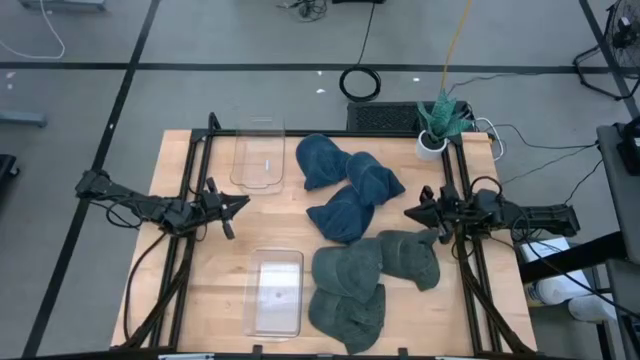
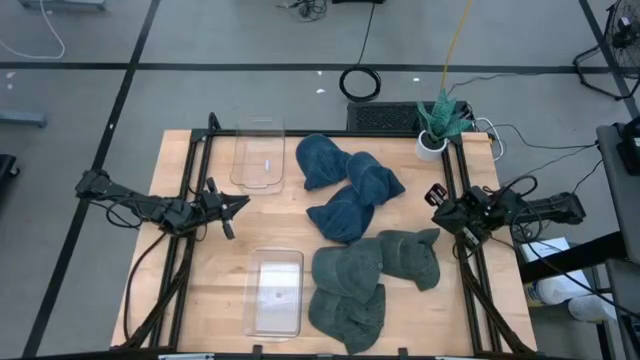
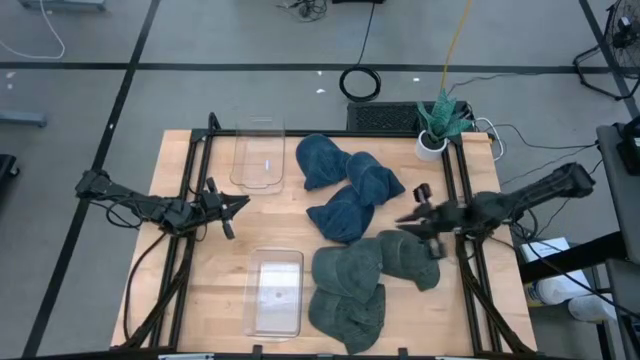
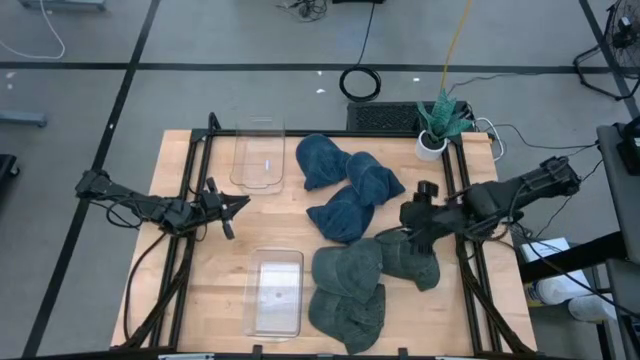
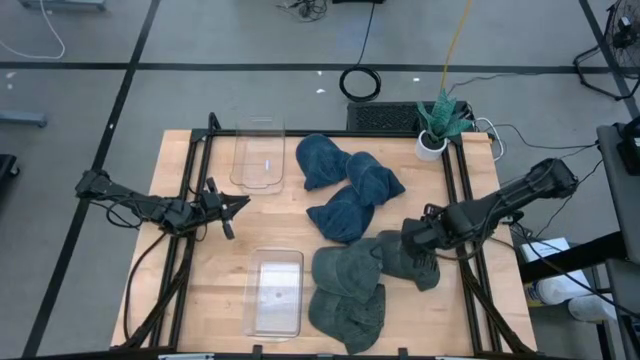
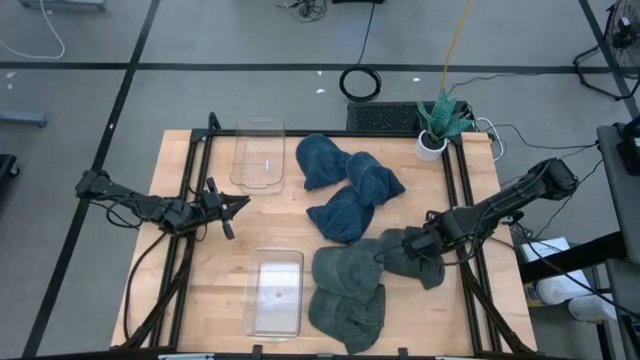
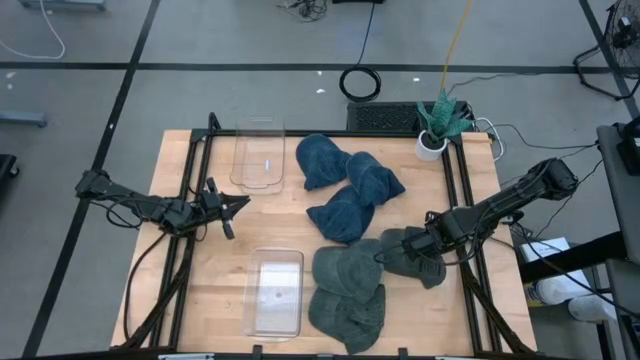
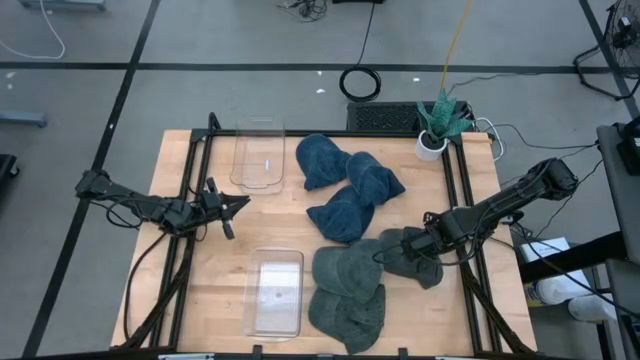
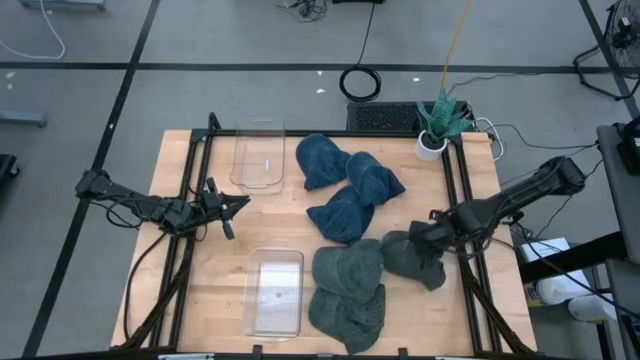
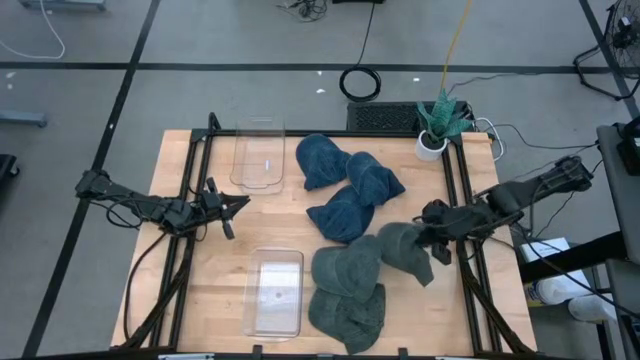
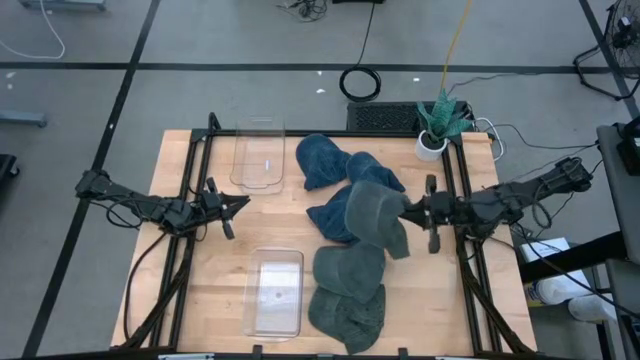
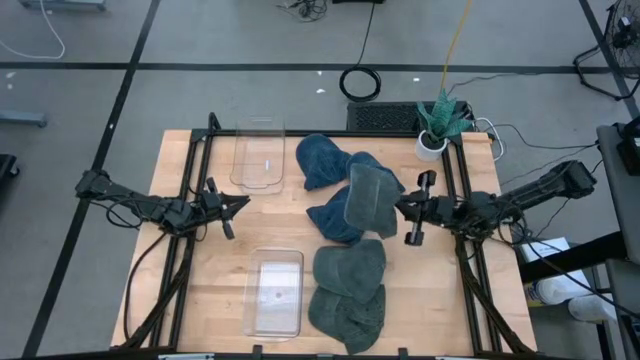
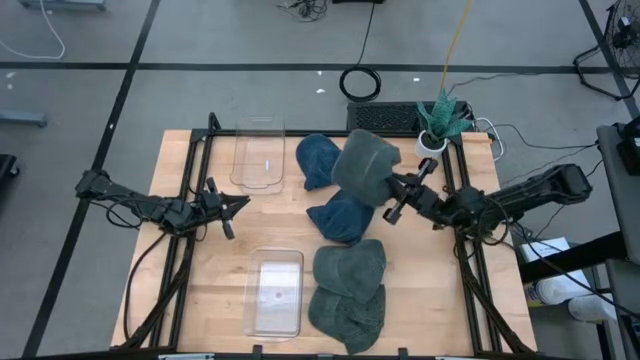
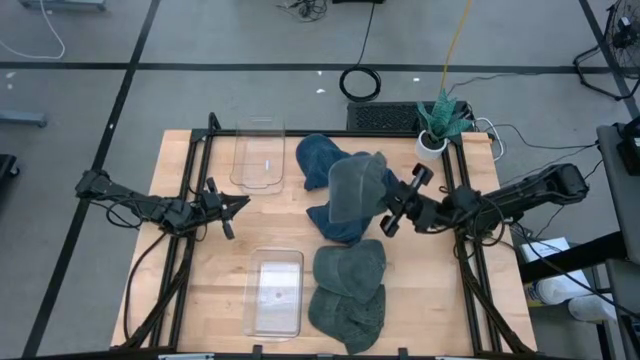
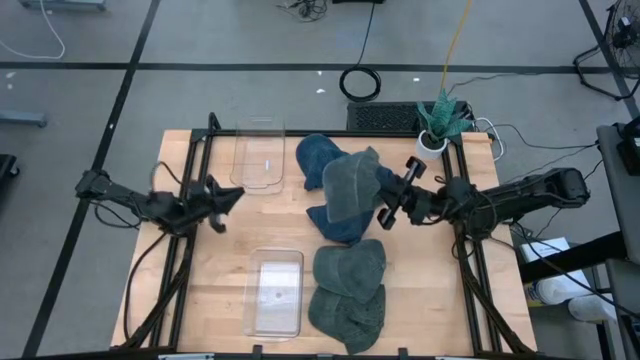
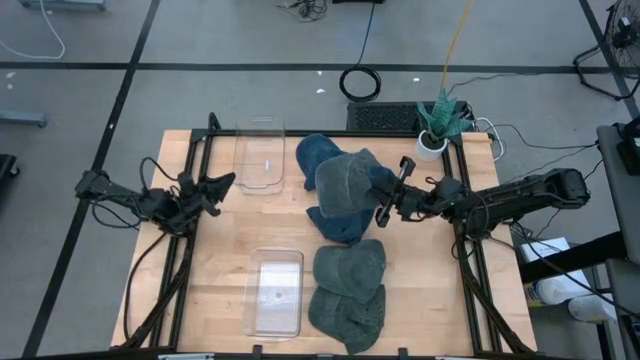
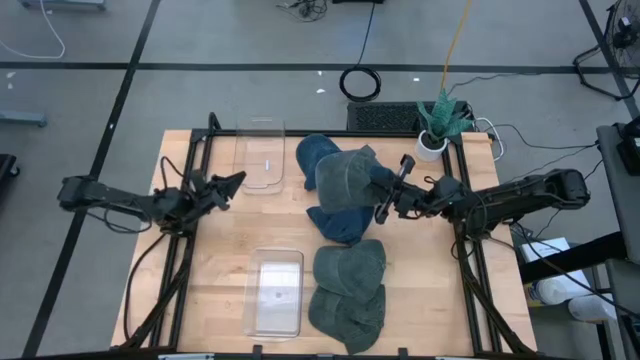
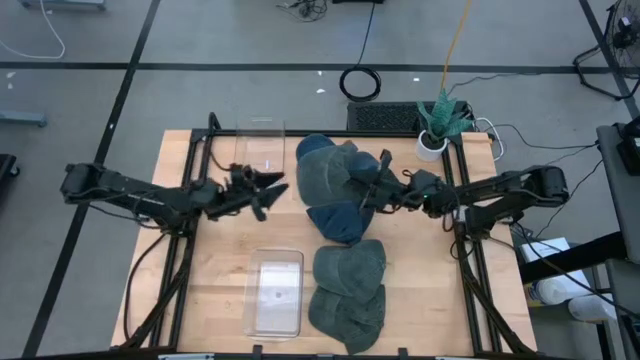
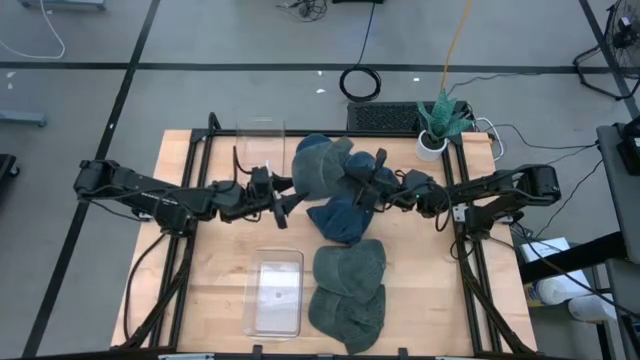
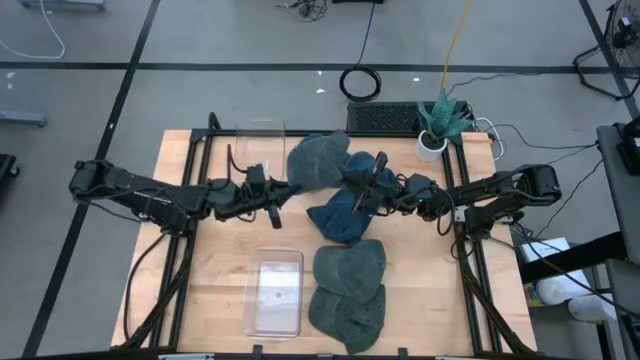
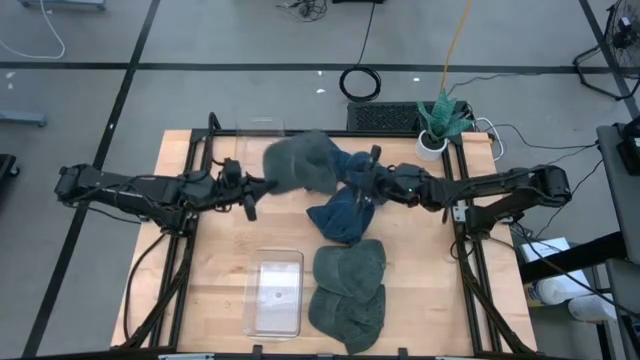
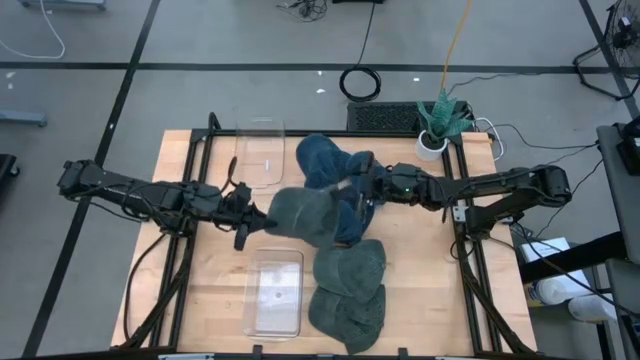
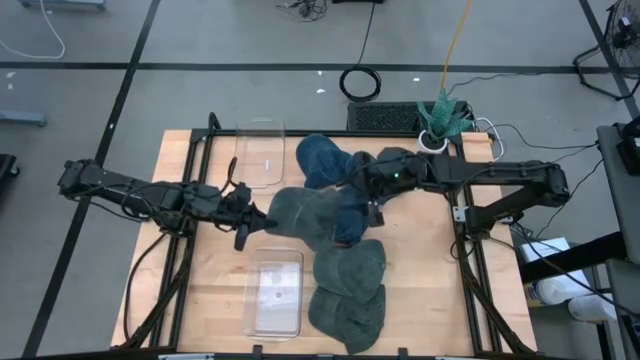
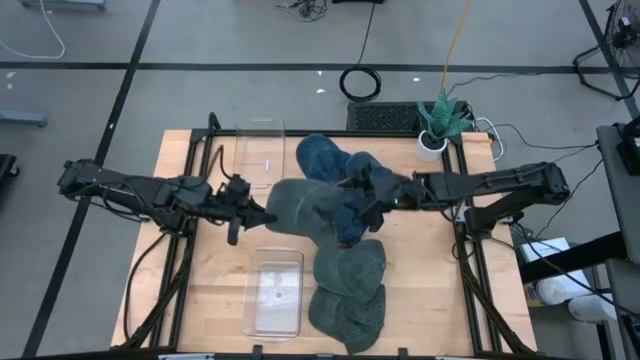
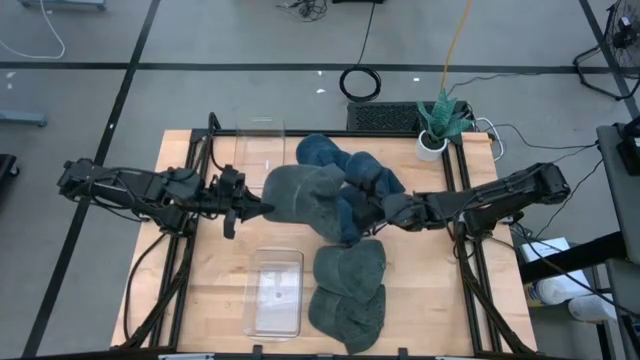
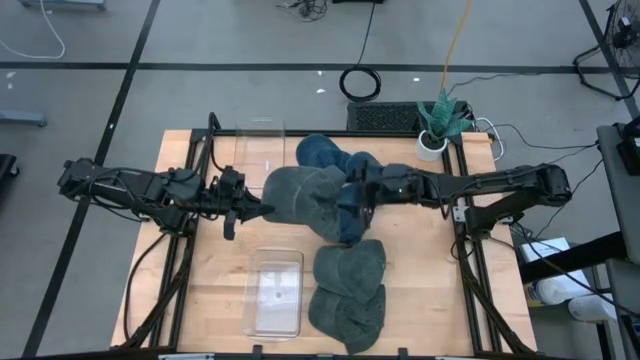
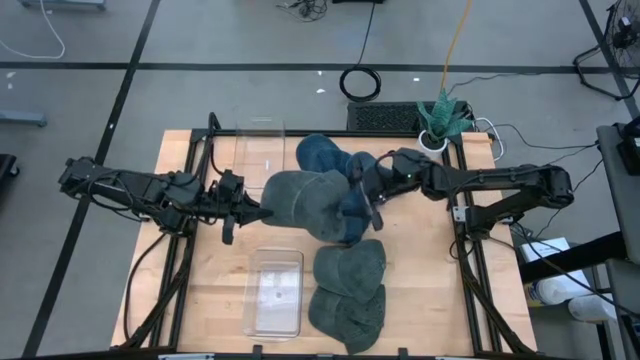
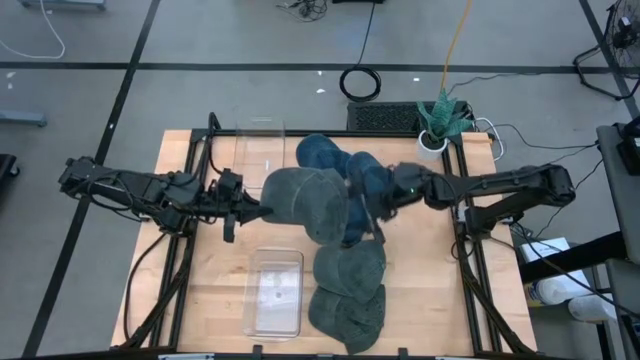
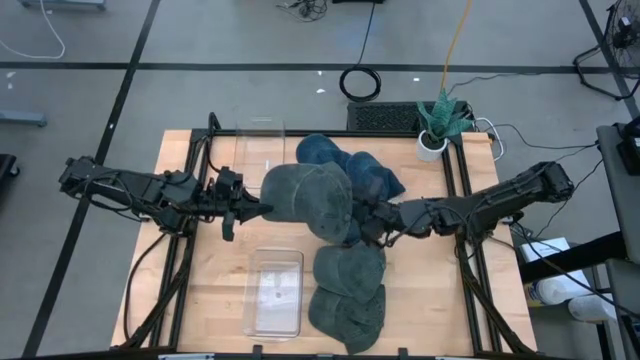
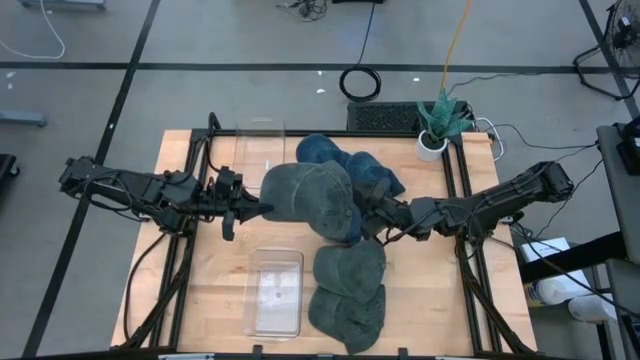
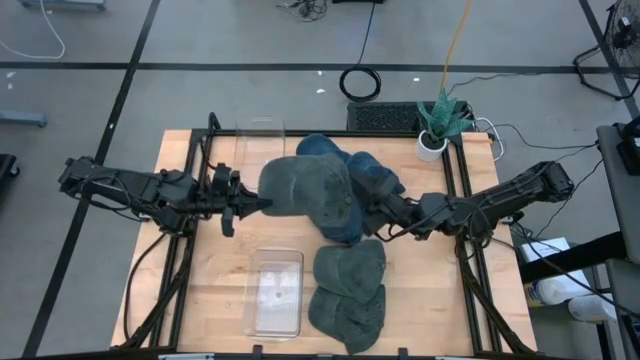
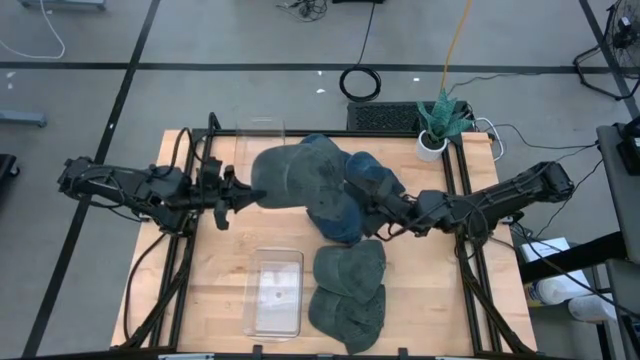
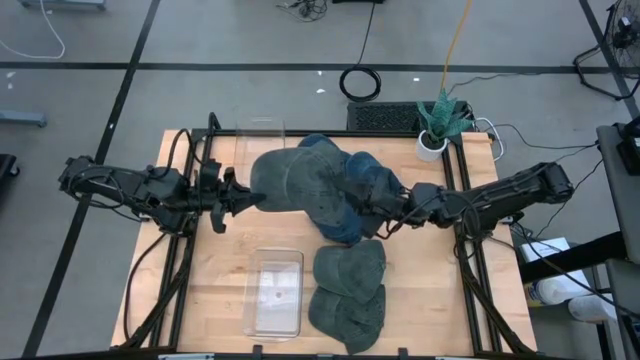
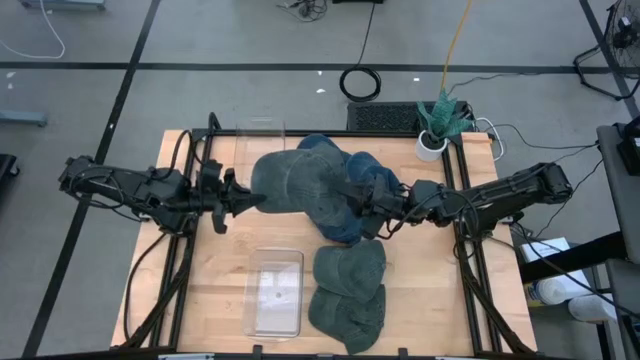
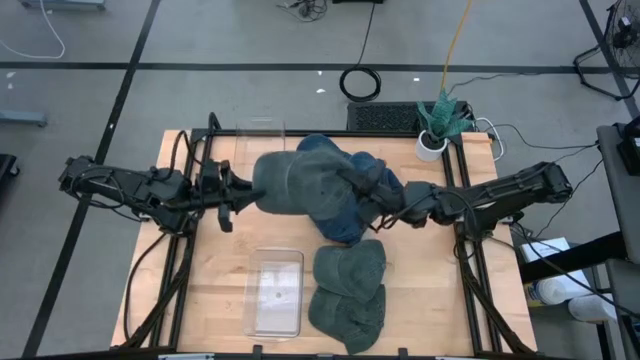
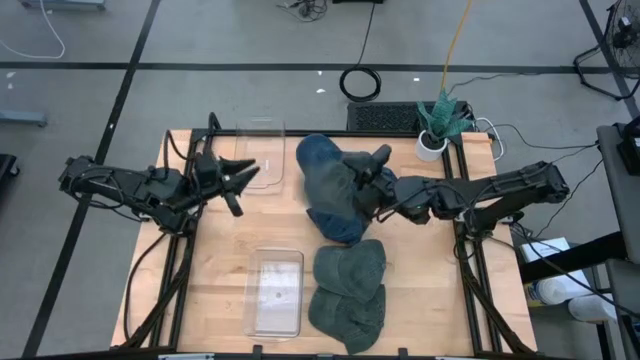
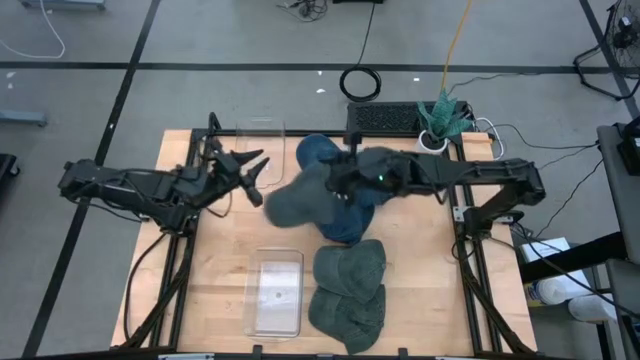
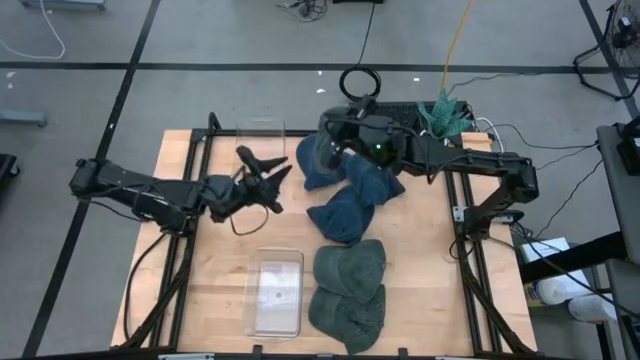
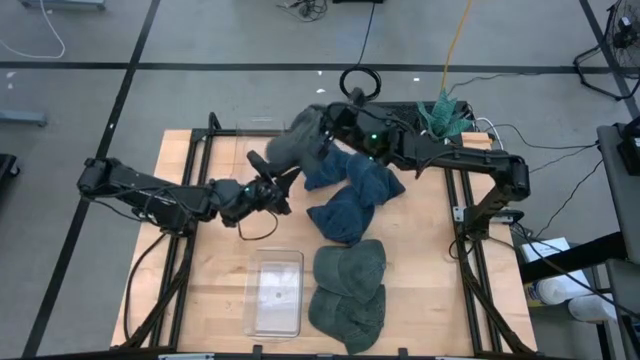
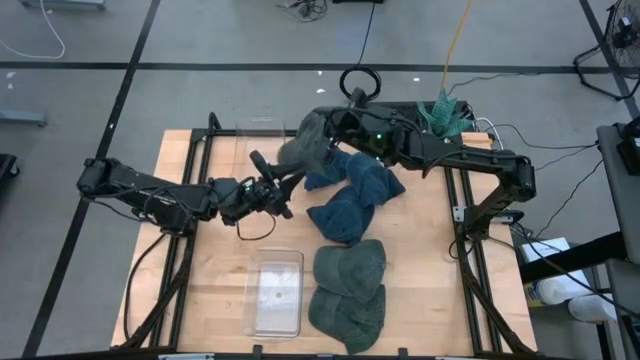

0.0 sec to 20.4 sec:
Task: Pick & Place hat
Put the top green cap into the top transparent bin
